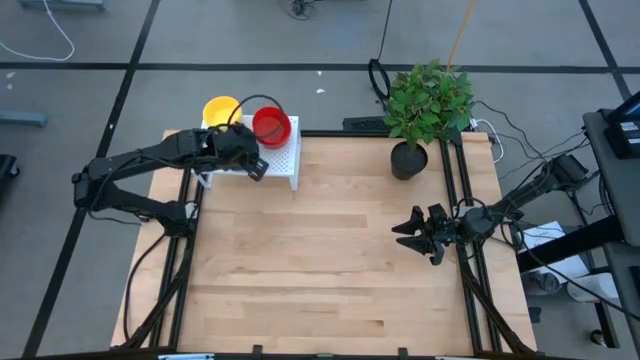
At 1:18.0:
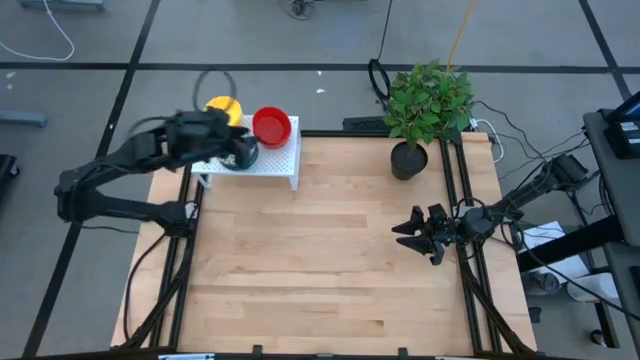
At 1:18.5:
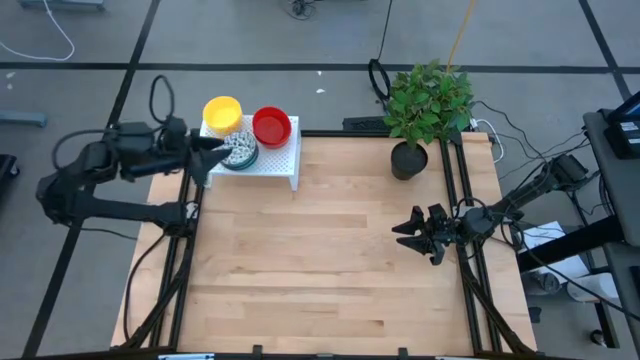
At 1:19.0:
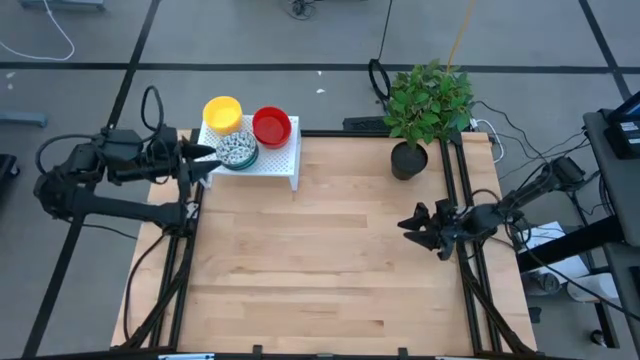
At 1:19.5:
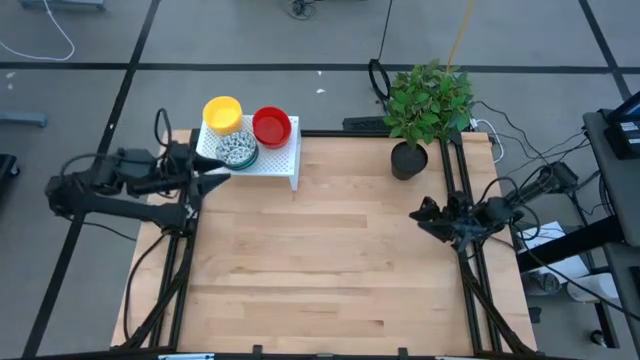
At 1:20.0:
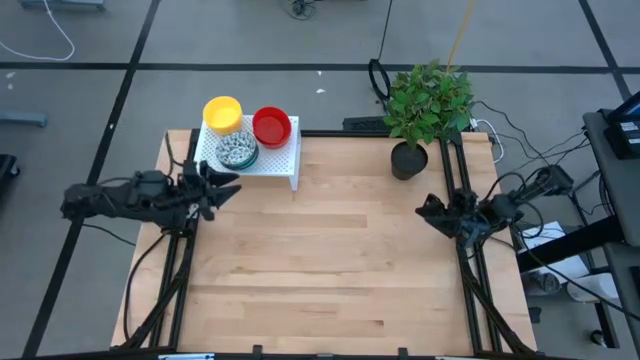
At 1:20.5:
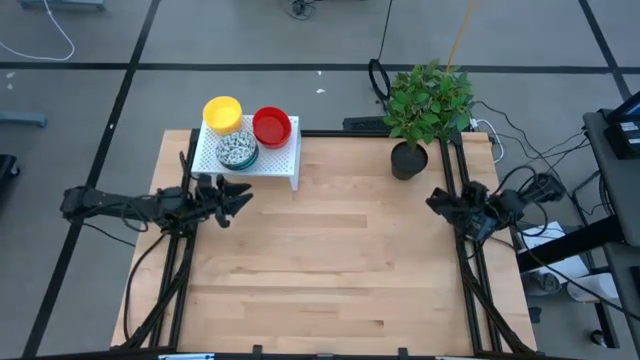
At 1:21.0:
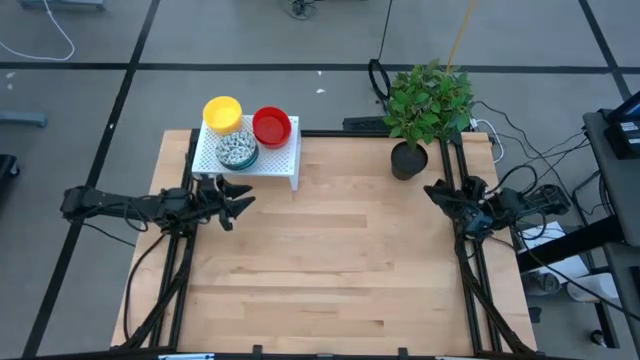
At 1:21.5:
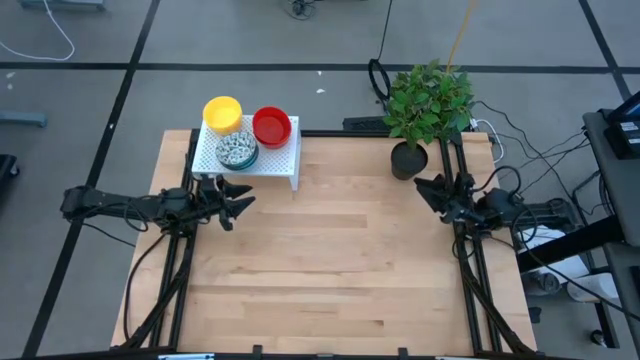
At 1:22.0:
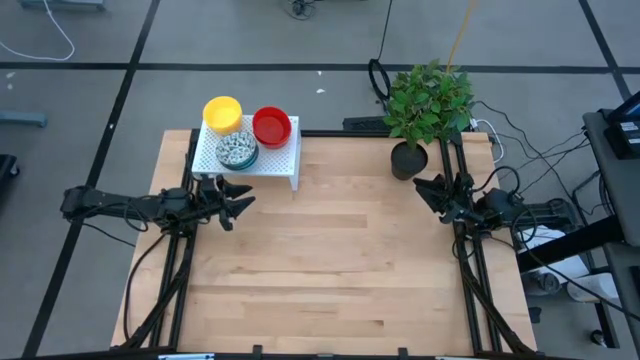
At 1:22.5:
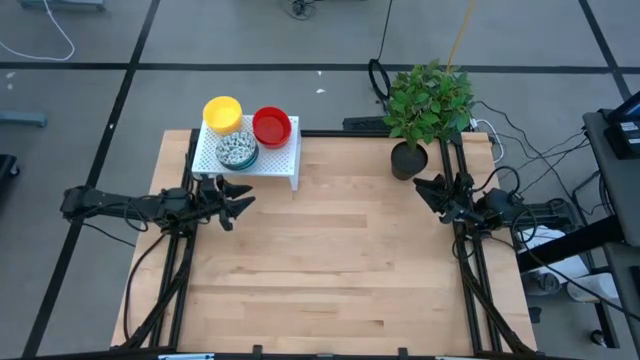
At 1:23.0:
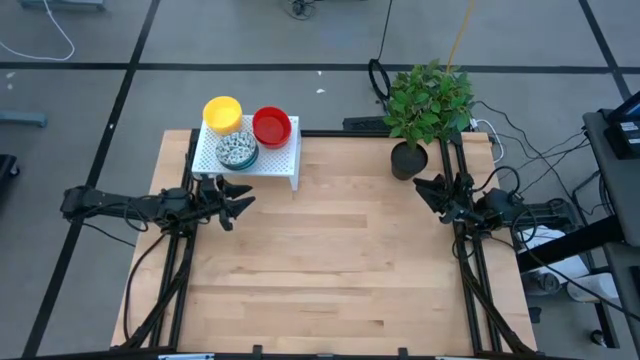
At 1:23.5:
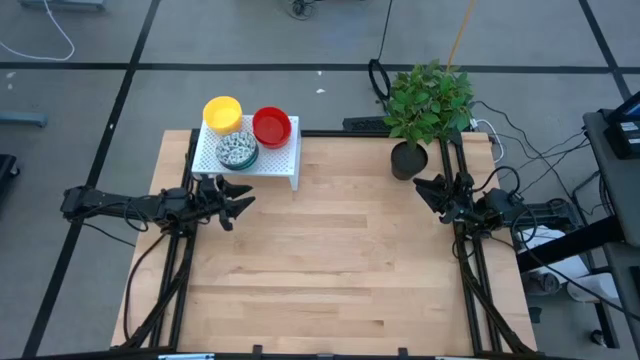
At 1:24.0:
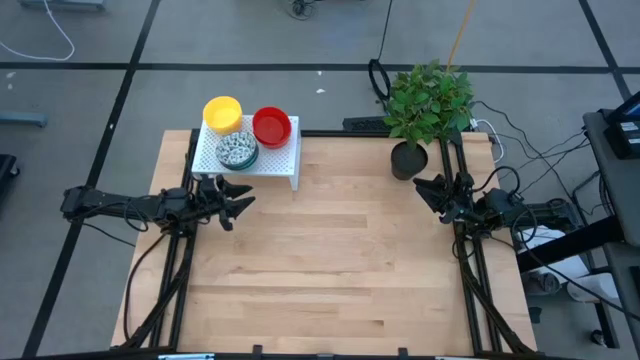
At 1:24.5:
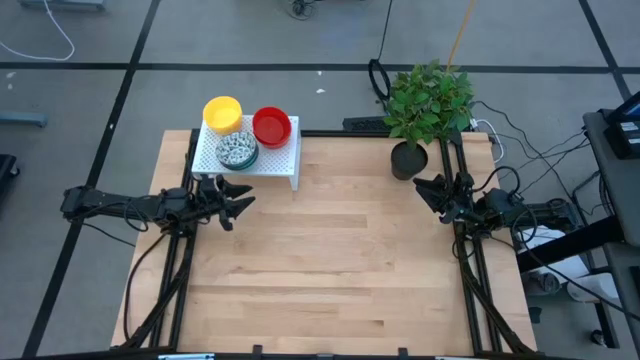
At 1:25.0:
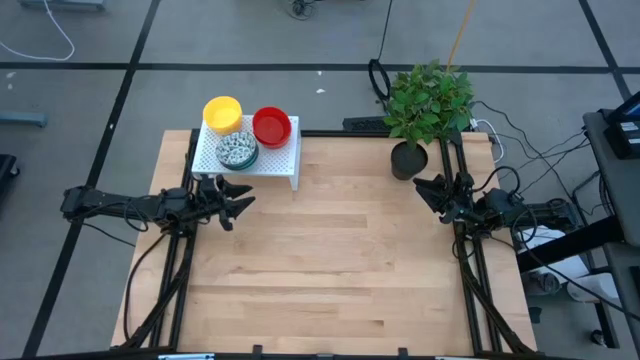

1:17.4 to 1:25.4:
Task: Pick & Place Mini bowls
Return to home position

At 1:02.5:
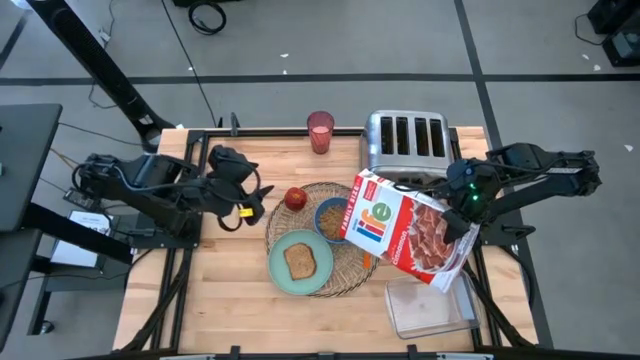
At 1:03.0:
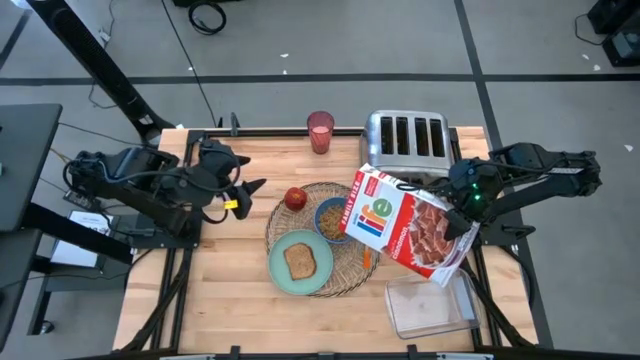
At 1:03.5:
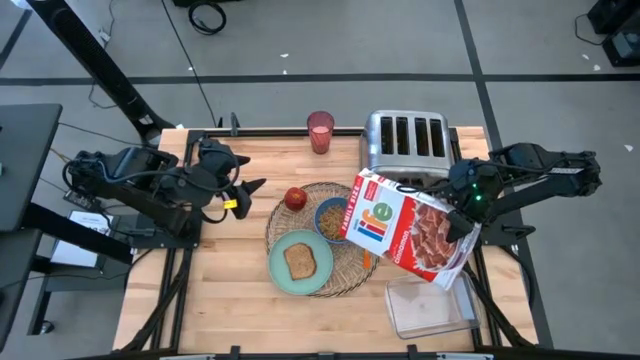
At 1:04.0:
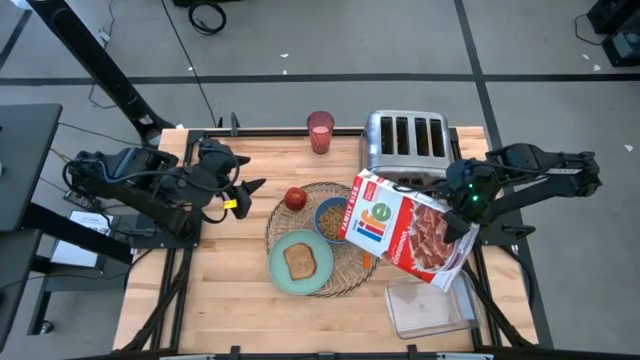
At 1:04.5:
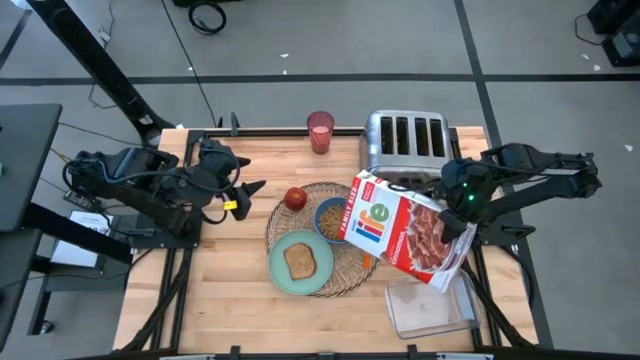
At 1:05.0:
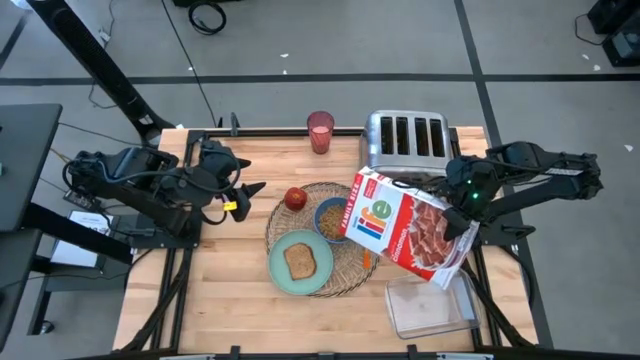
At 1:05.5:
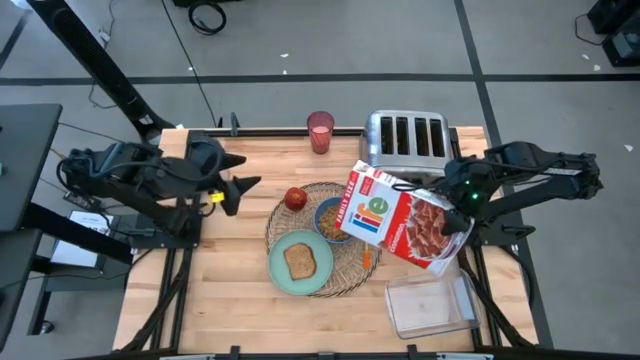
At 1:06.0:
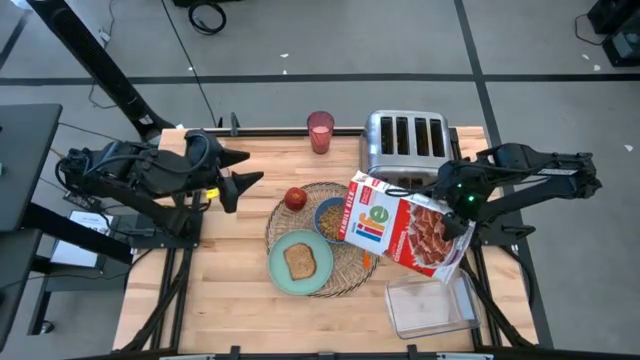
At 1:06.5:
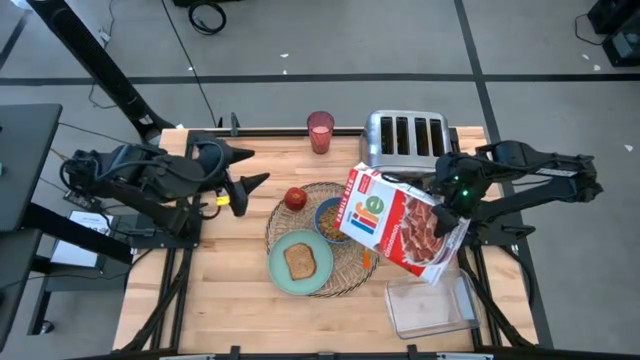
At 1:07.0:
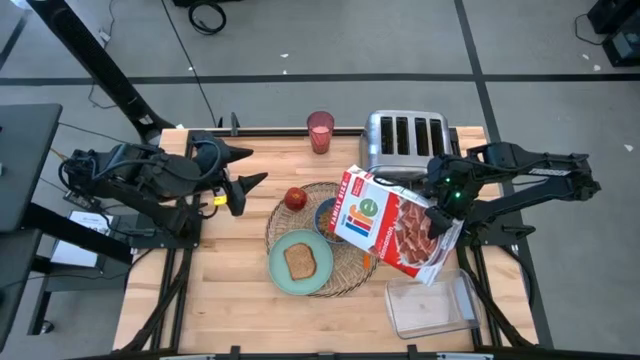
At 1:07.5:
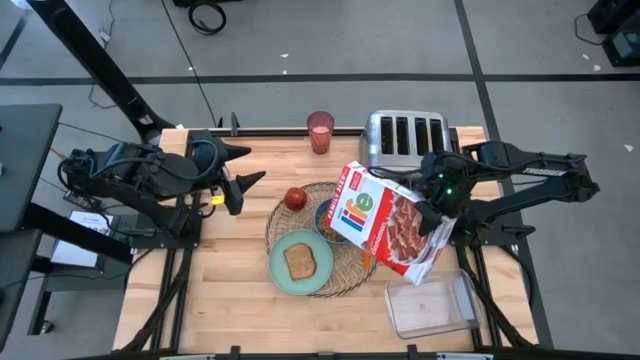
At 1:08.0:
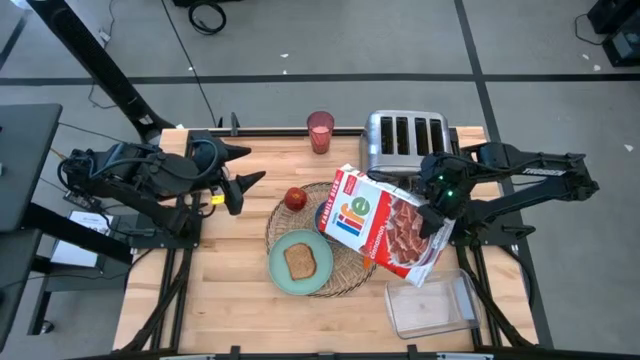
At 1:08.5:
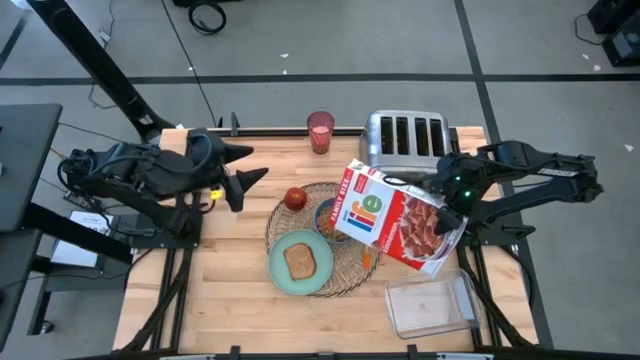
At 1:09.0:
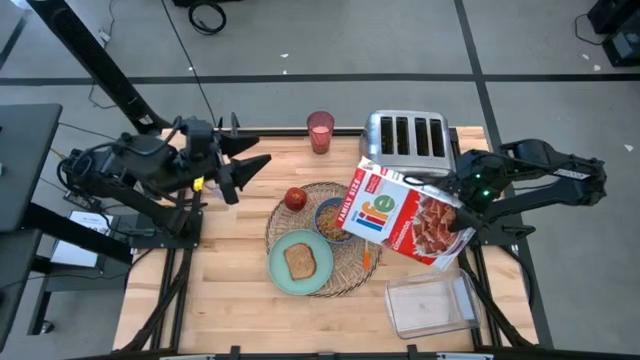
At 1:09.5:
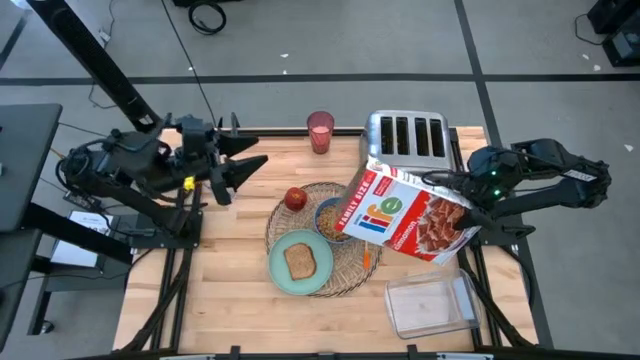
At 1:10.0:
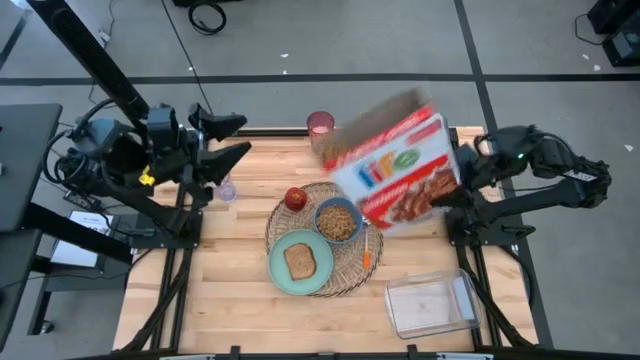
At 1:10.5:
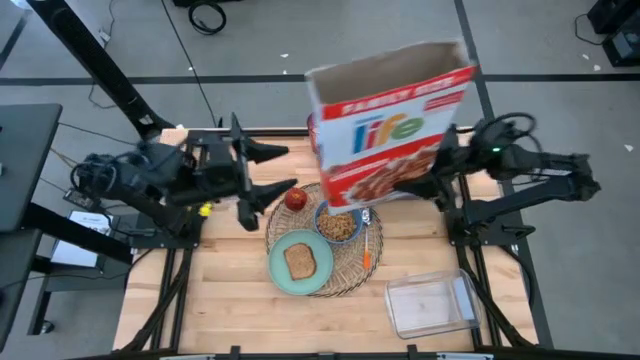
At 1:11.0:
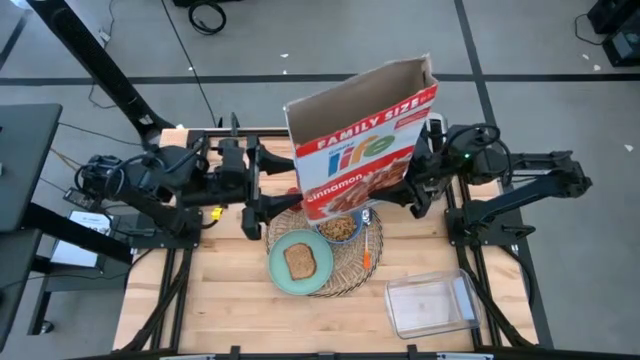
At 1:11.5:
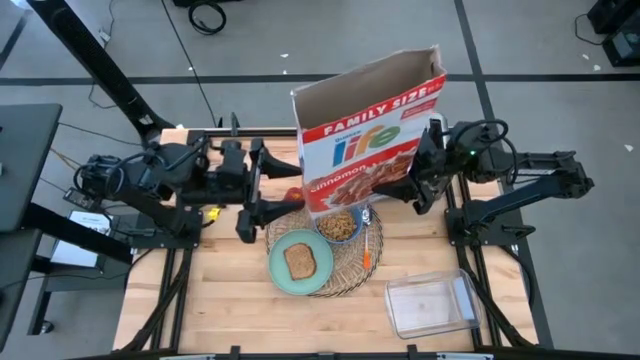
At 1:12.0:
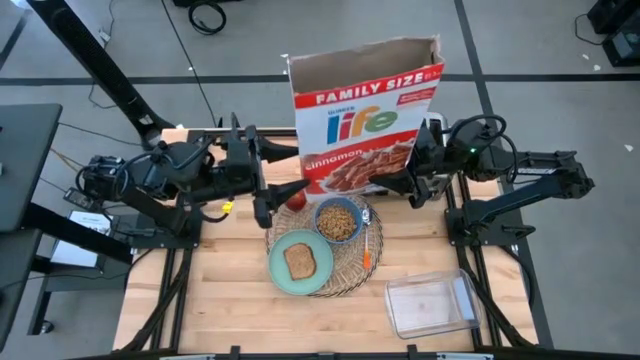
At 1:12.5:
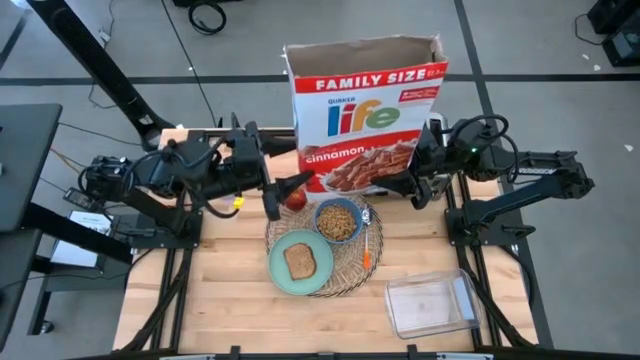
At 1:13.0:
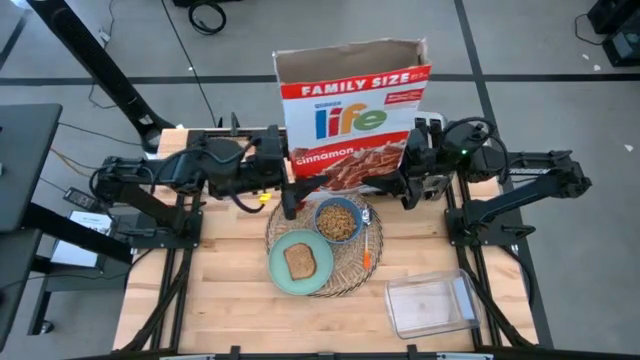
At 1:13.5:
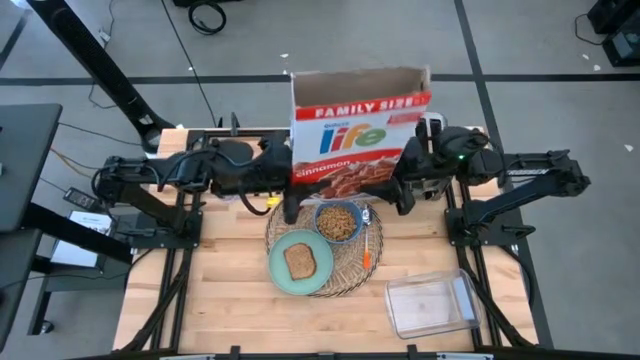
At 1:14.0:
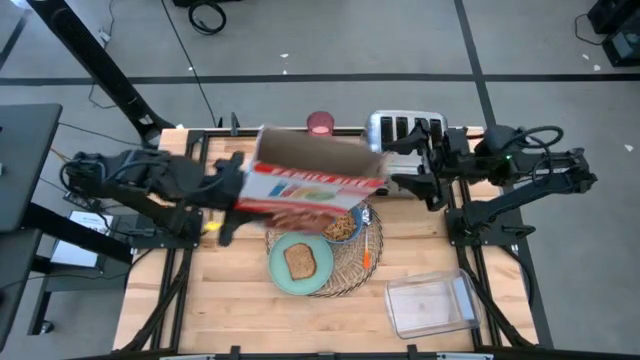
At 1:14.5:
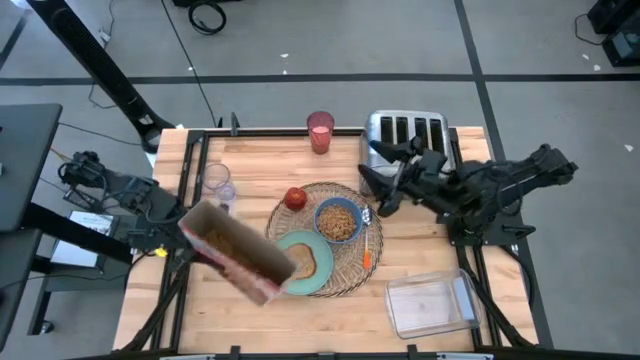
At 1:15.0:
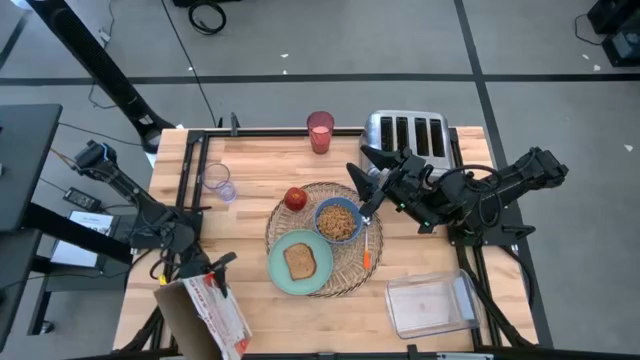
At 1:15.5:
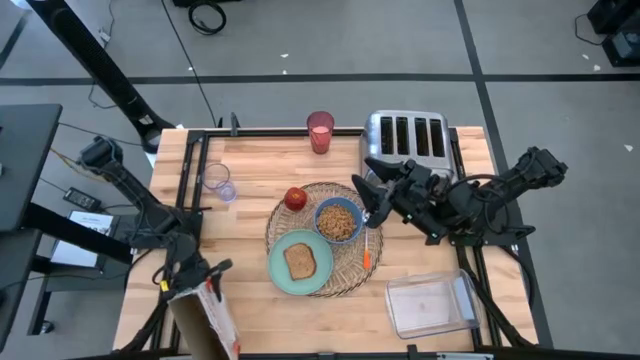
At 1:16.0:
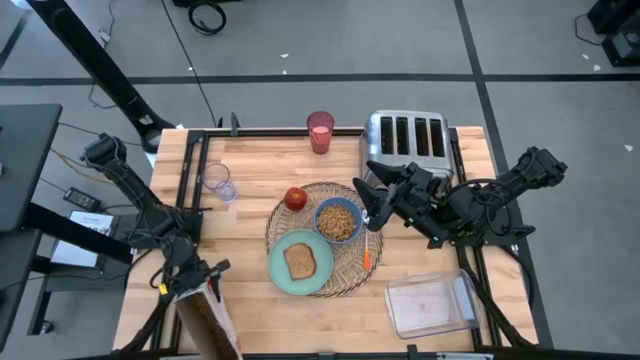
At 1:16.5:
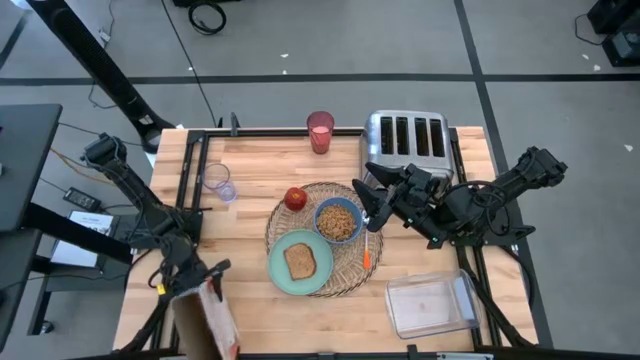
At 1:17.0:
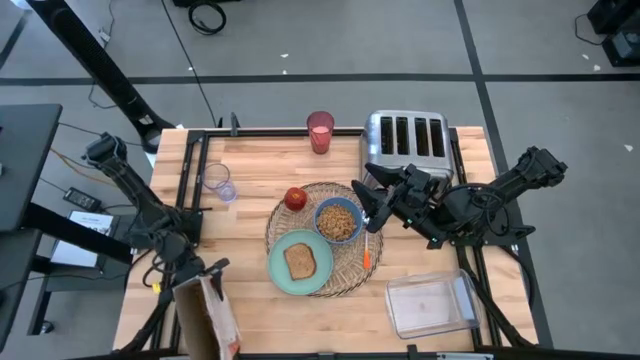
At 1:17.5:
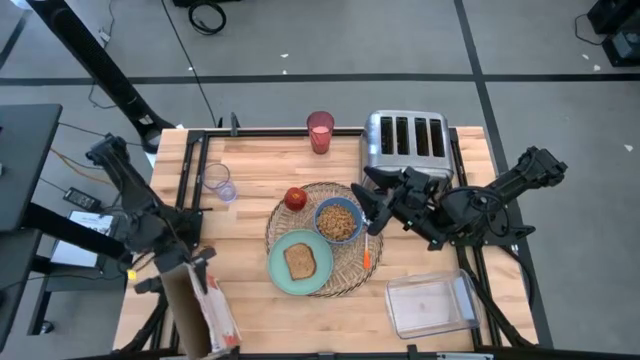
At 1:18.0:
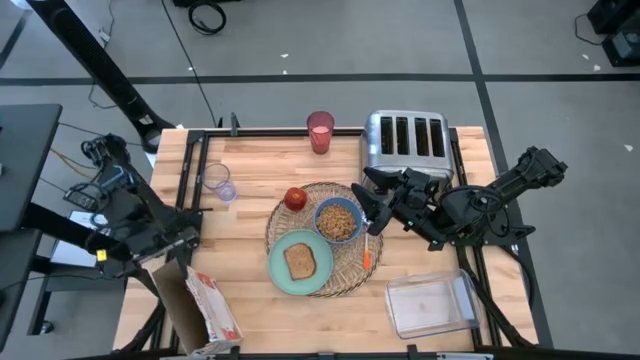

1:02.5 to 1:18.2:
Task: Arrange a breakfast setting
Pour the cereal from the cereal box into the blue bowl
